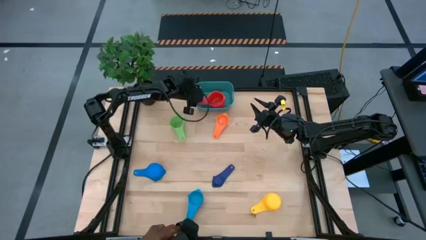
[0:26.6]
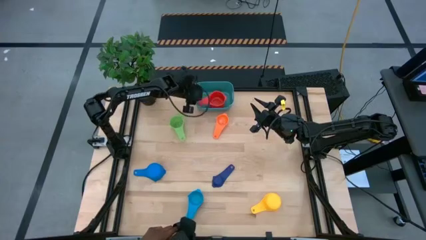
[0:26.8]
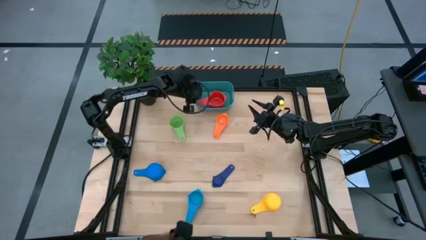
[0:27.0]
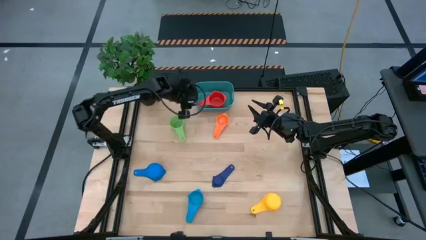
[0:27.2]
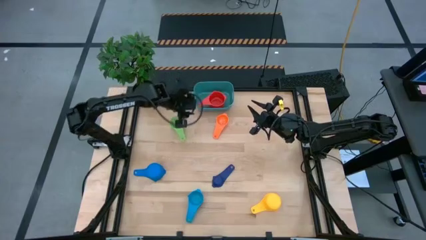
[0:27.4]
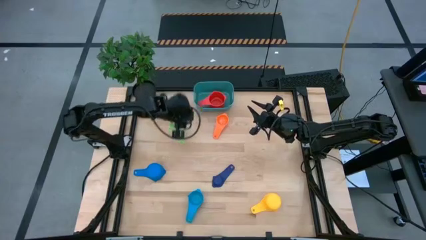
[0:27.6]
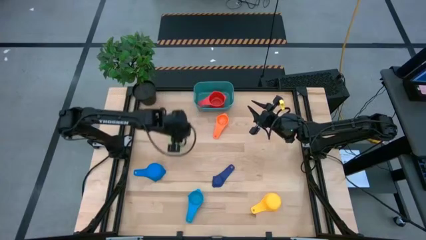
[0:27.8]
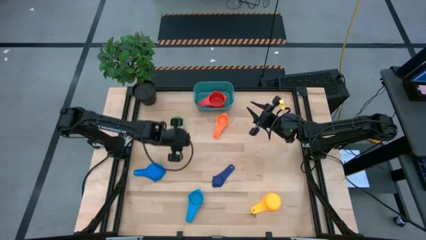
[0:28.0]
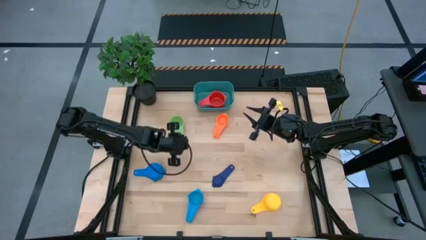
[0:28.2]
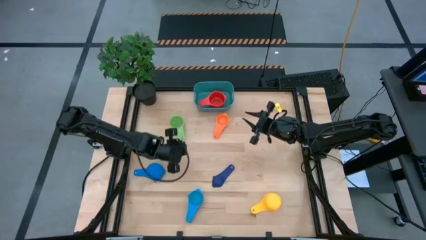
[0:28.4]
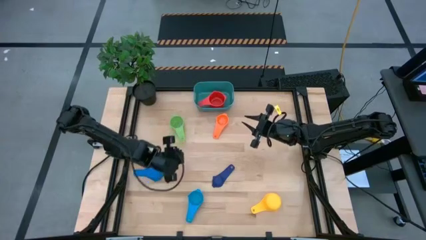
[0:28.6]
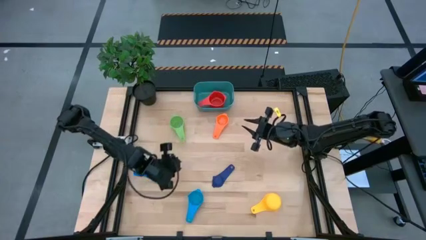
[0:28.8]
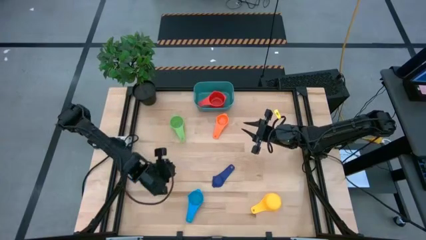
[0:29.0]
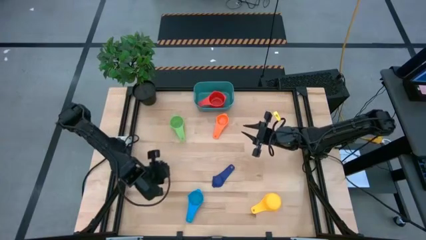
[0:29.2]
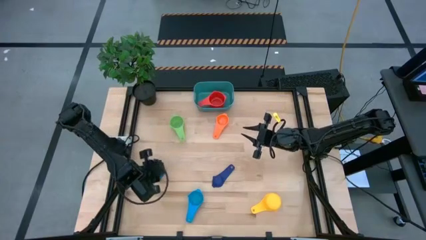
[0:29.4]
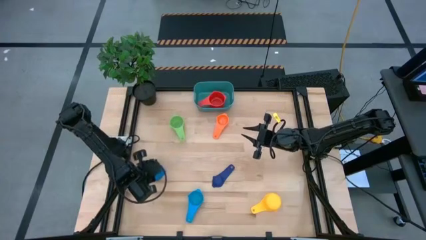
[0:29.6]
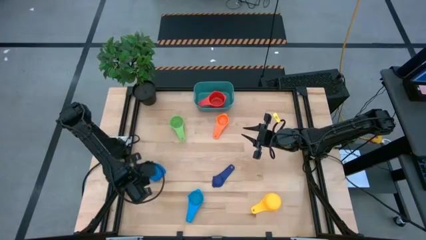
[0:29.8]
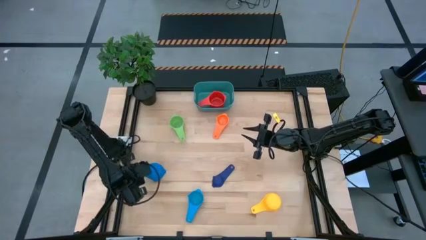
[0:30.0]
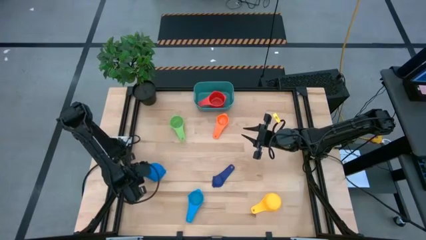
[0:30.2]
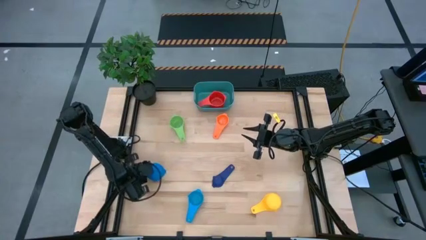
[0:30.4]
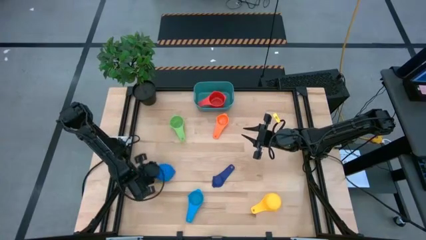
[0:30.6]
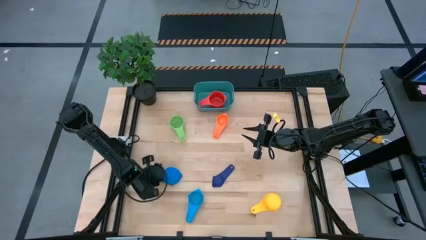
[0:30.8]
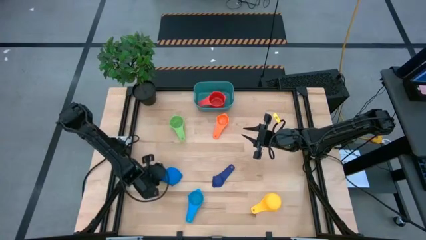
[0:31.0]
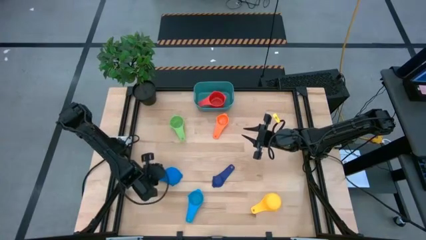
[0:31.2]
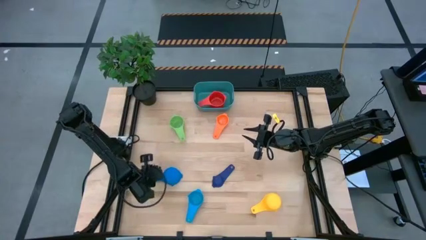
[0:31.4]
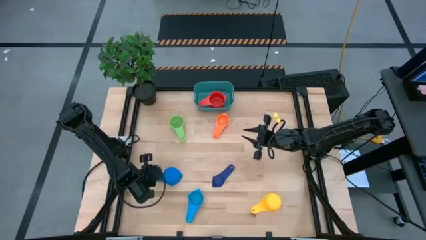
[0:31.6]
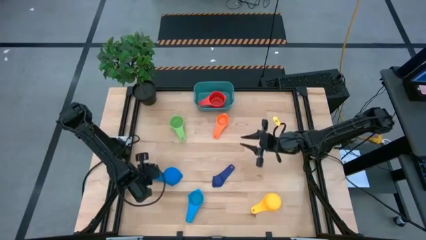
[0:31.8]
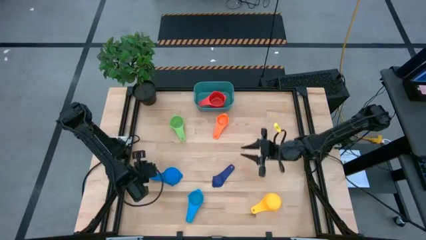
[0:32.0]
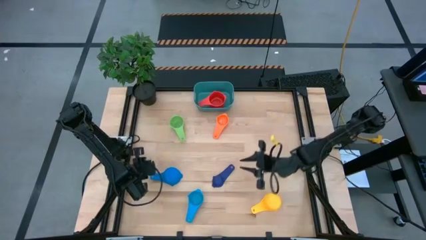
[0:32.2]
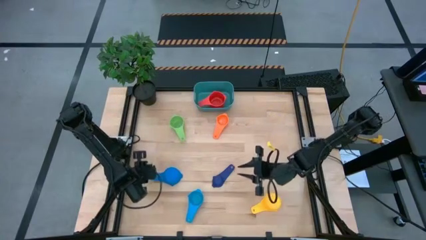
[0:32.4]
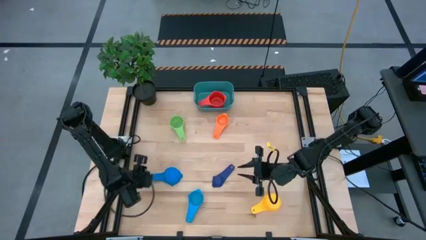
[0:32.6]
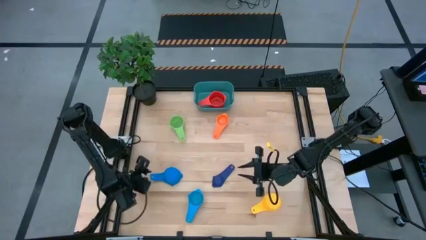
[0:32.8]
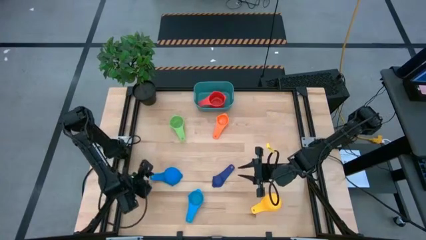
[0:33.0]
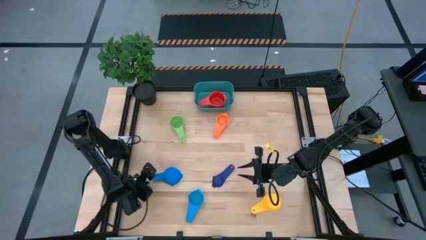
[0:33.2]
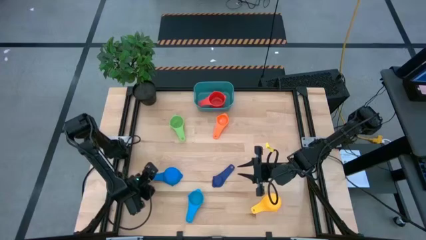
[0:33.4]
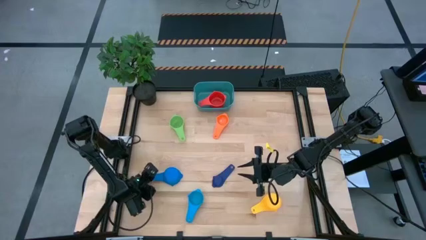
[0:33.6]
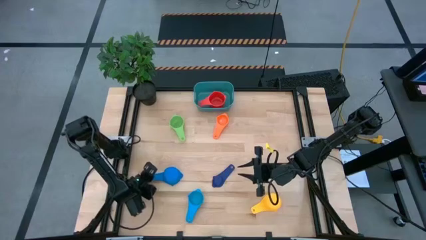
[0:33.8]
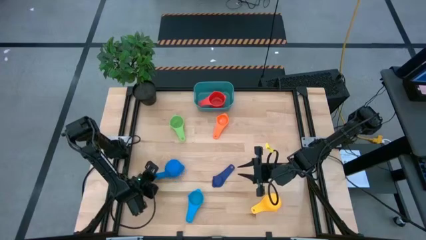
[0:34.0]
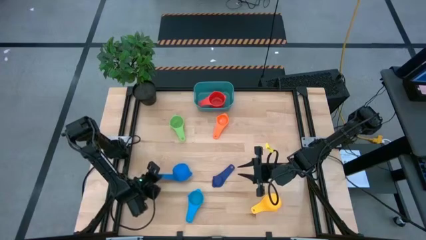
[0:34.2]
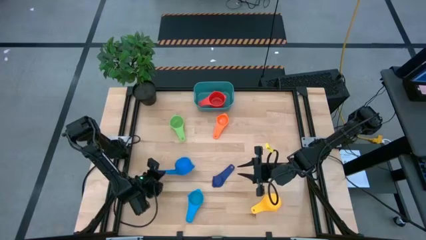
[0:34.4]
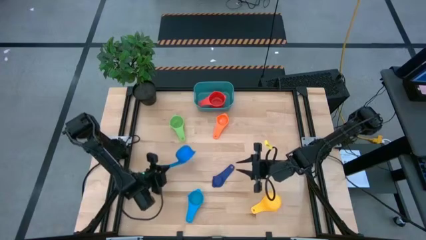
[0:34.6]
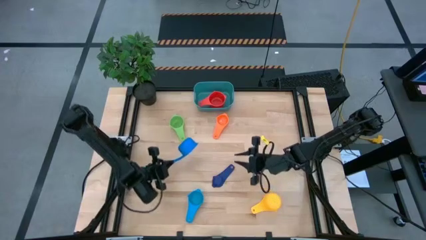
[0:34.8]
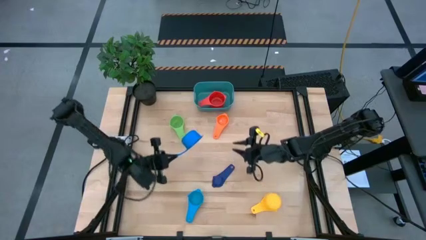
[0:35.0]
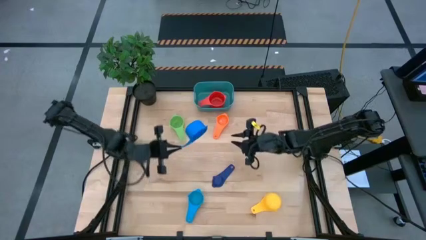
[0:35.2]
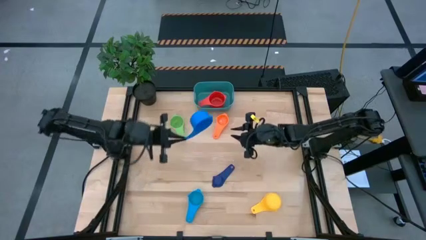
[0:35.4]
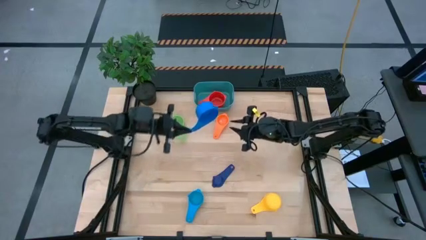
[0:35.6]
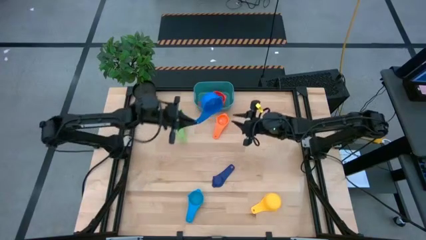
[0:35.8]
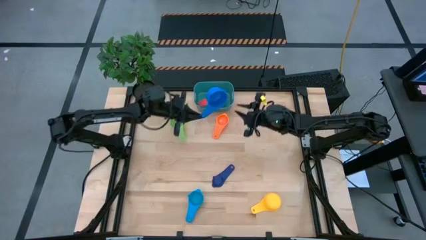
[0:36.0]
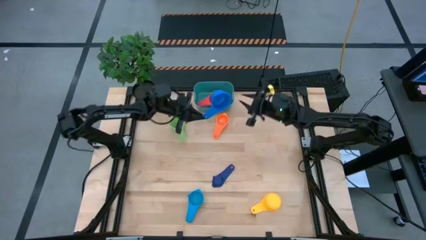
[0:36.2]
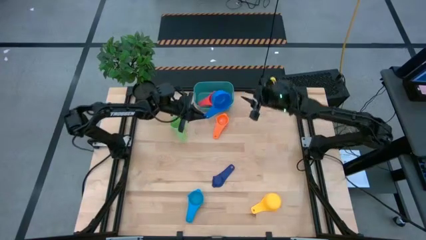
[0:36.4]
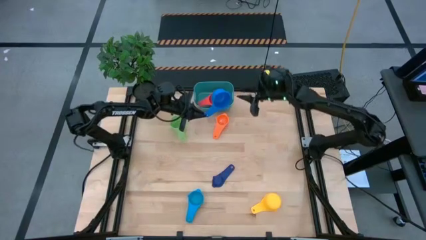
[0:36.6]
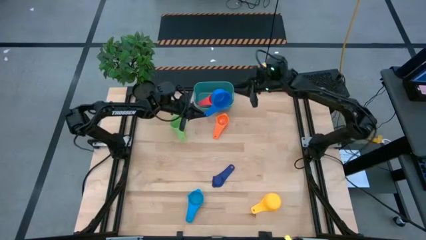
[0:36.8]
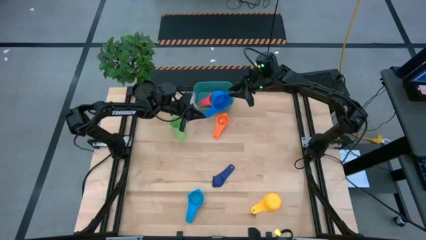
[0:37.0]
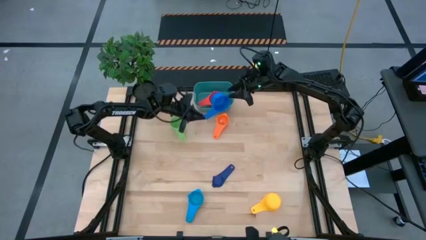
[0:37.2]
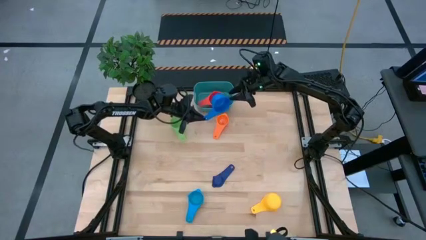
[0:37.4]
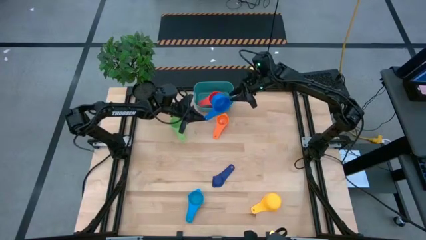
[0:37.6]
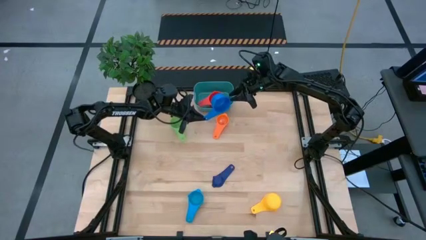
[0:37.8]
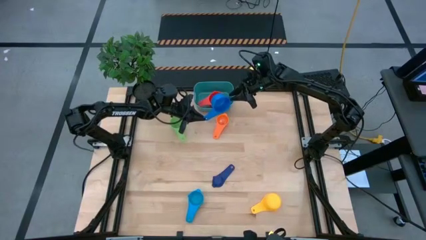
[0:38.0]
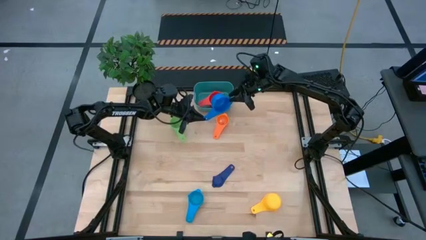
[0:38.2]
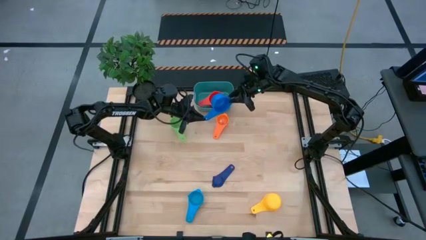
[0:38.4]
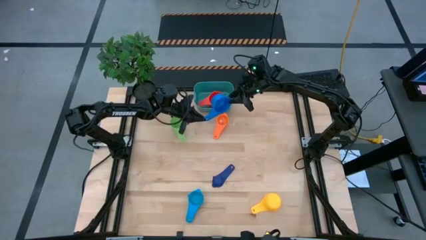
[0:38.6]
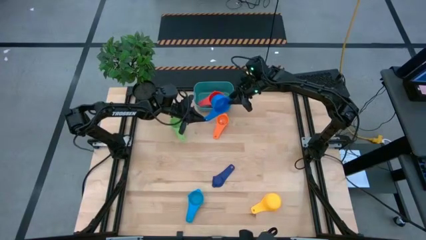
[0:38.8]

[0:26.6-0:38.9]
Task: Nest measuring cups in basket
Stack the blue measuring cup on top of the red measuring cup in the blue bin
